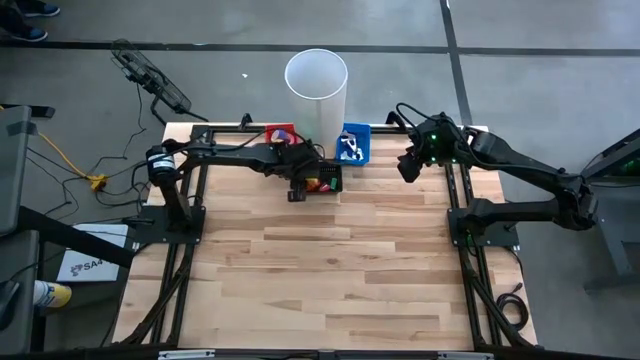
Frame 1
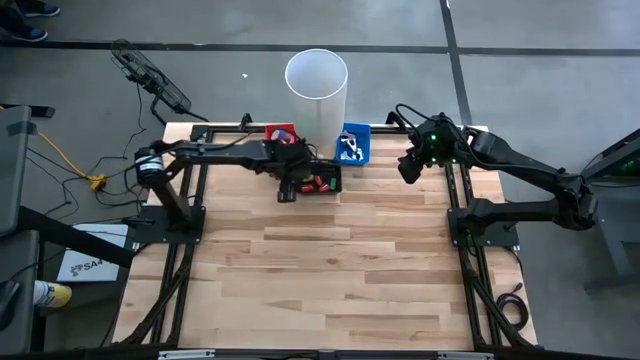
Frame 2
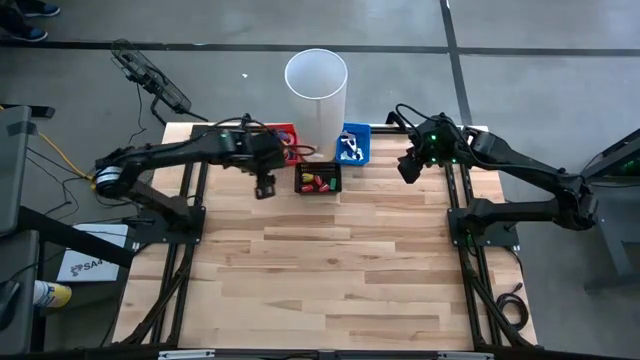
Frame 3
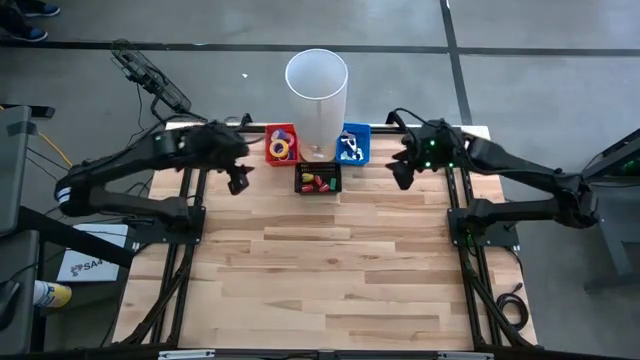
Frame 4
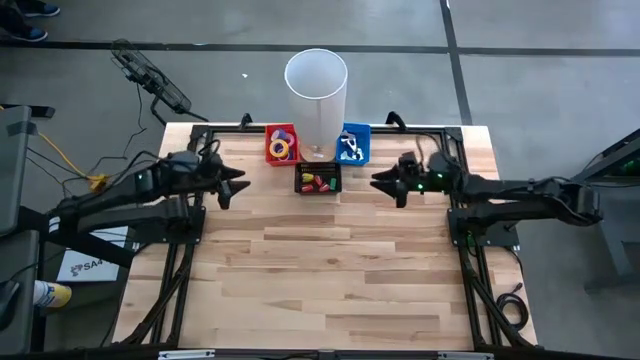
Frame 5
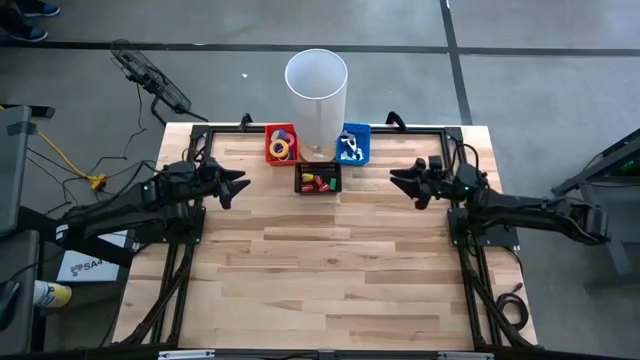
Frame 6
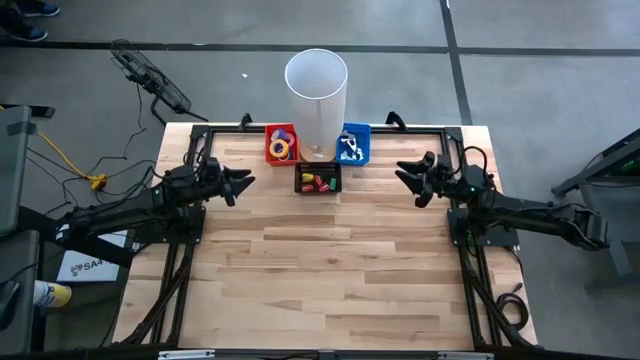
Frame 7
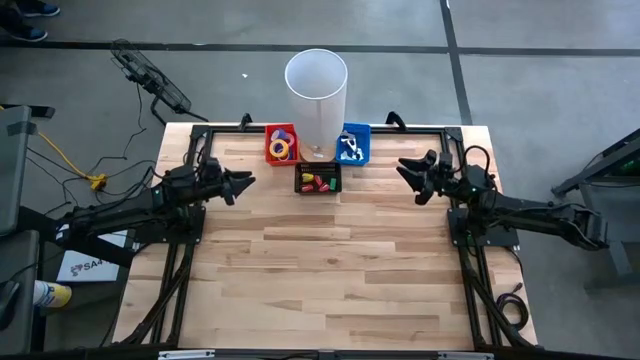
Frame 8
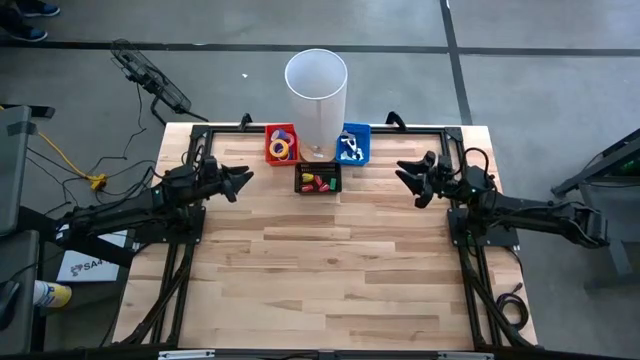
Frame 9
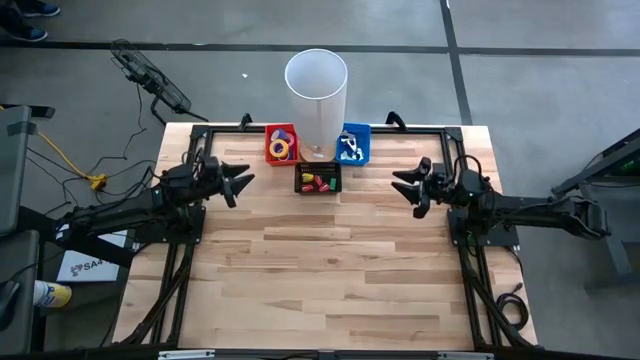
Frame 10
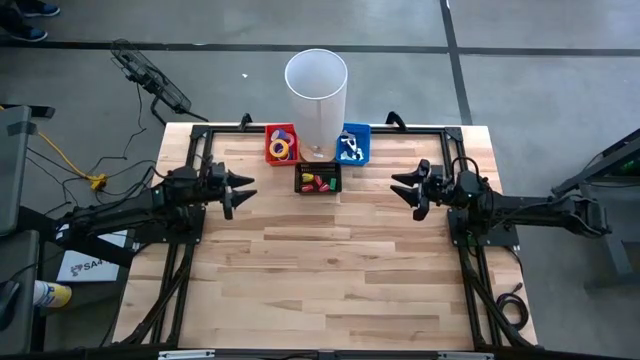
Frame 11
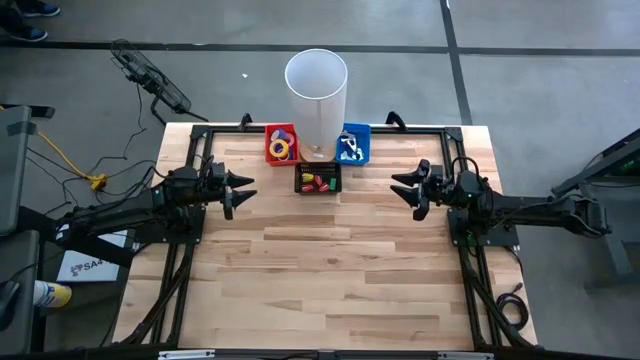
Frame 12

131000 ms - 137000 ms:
Task: Pick and place Stapler, Stapler remover, tape
Return to Home Position

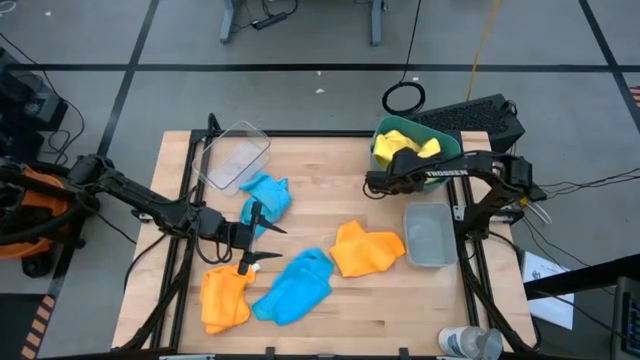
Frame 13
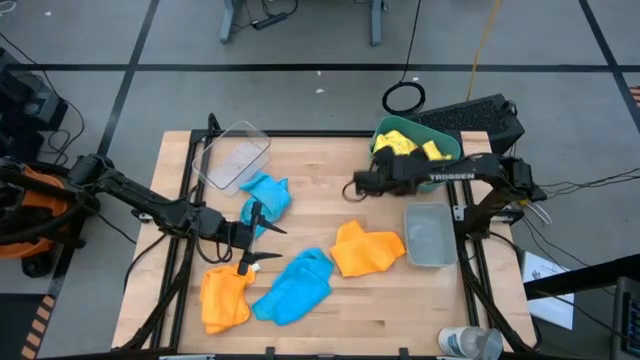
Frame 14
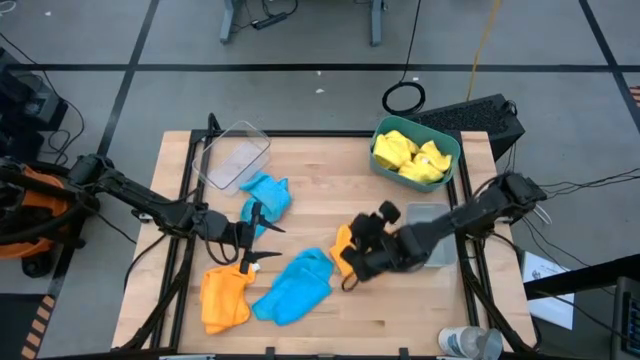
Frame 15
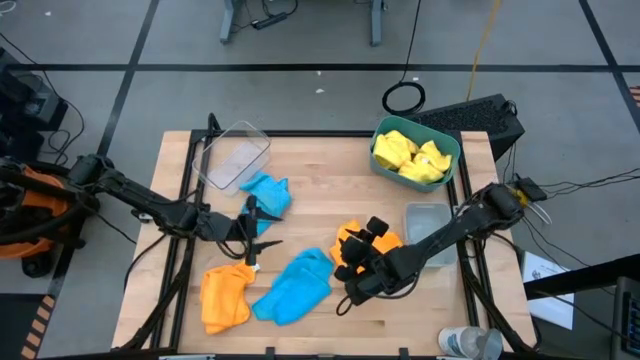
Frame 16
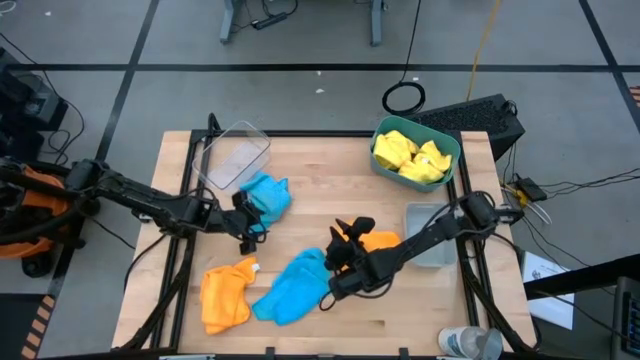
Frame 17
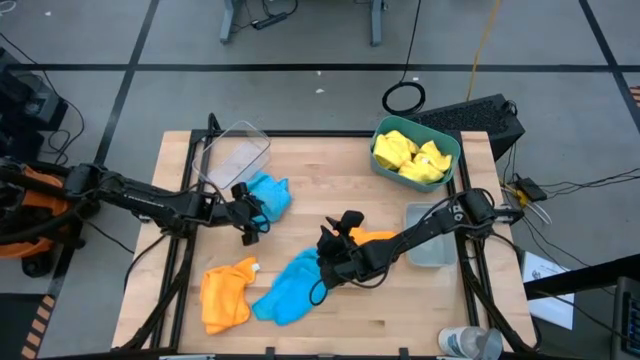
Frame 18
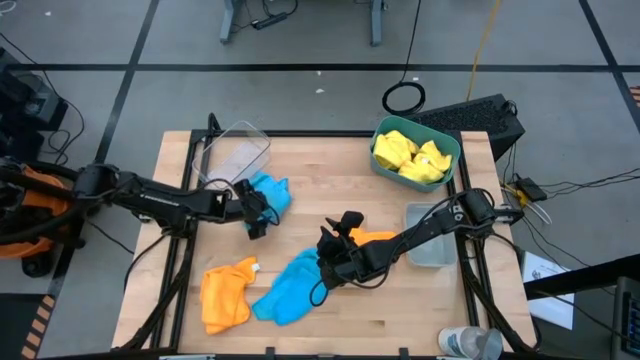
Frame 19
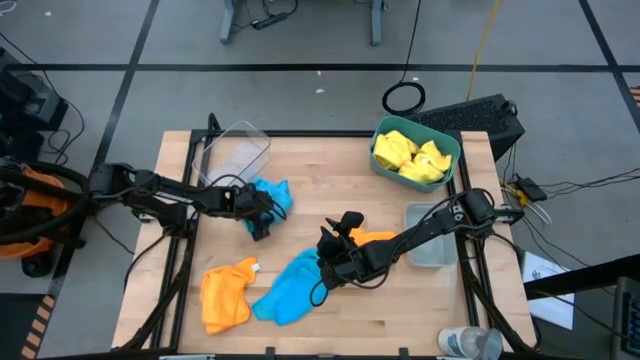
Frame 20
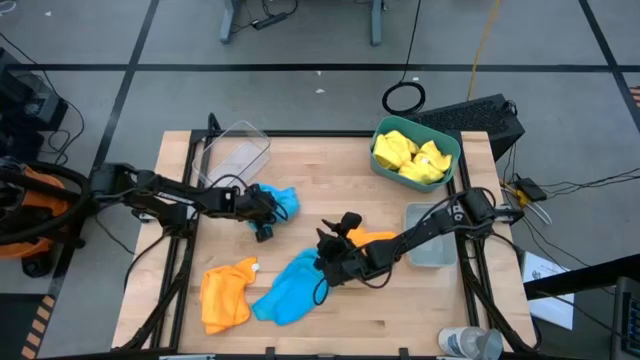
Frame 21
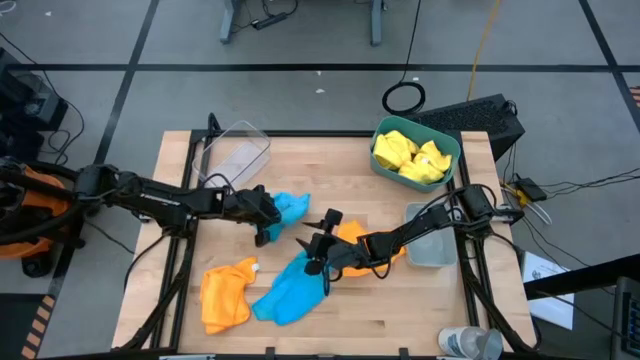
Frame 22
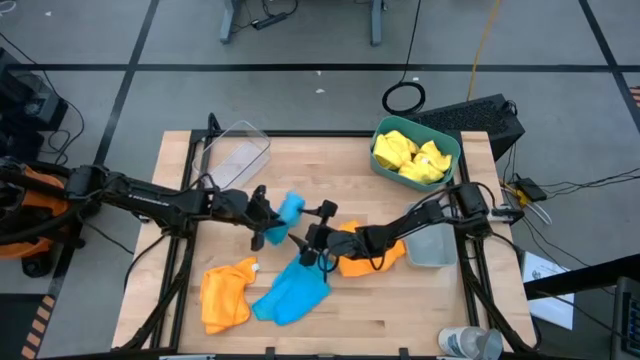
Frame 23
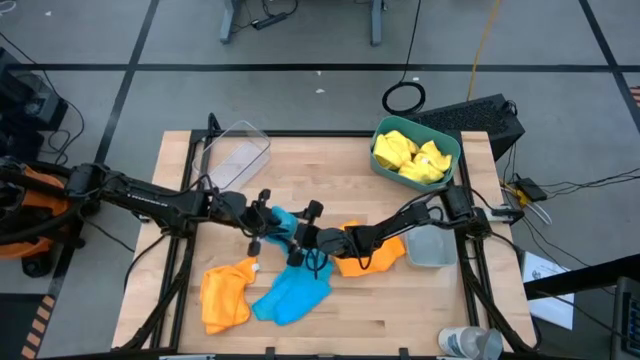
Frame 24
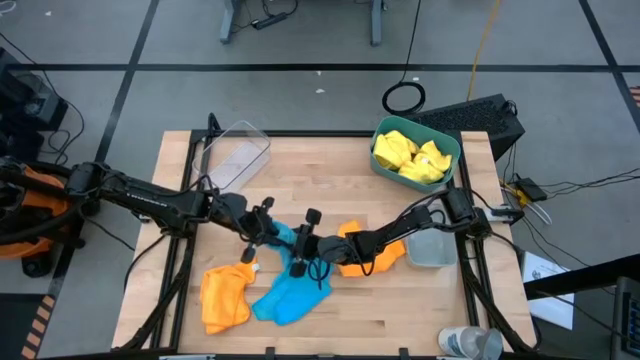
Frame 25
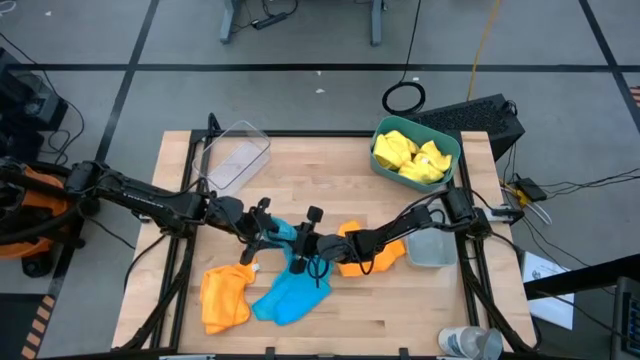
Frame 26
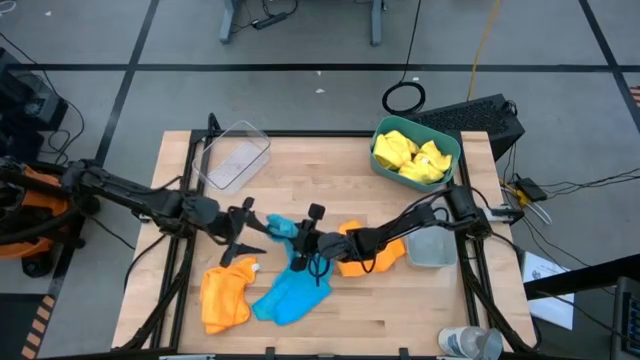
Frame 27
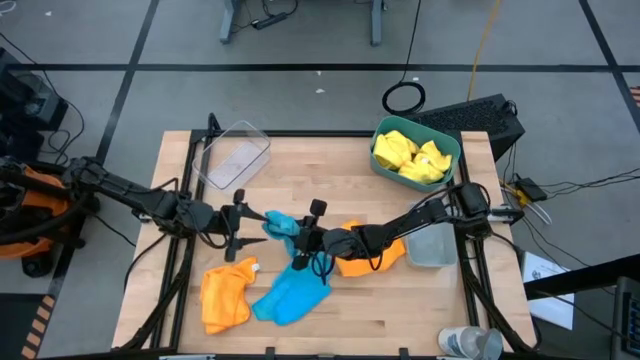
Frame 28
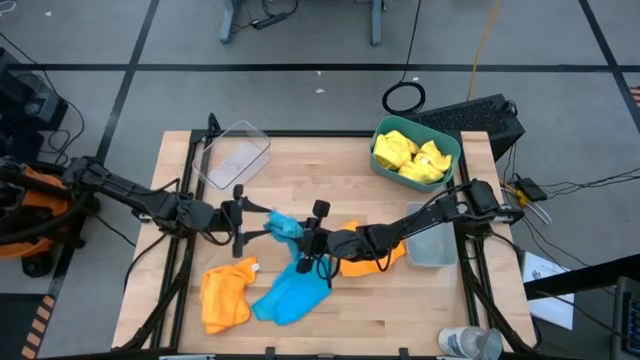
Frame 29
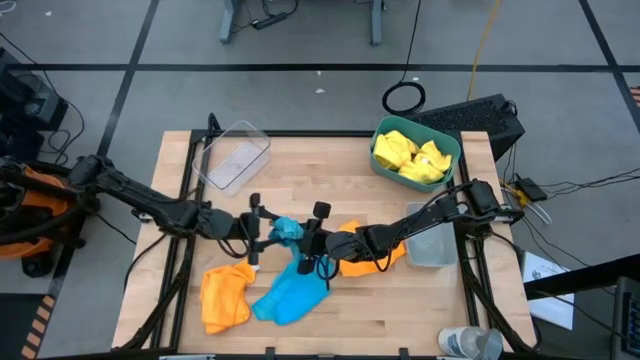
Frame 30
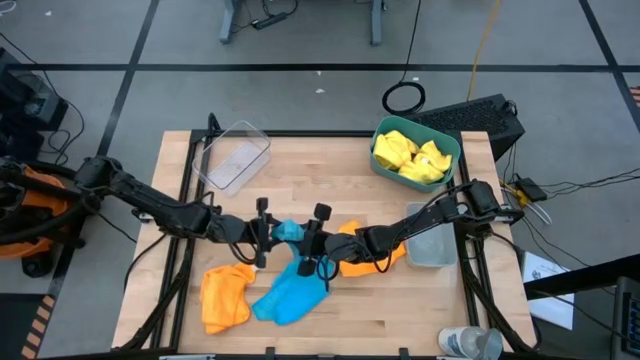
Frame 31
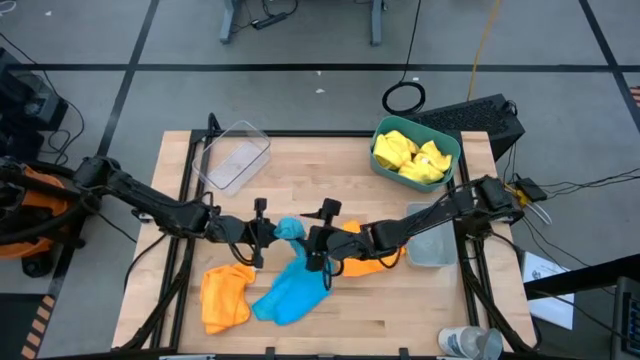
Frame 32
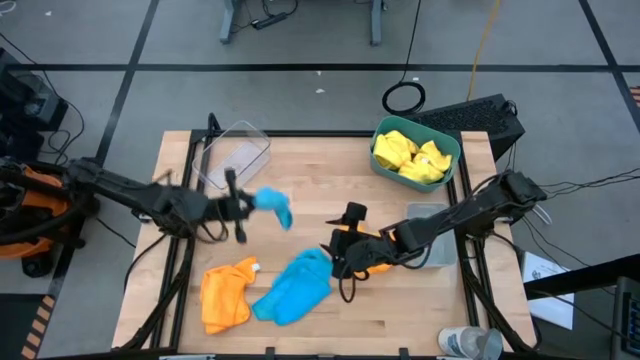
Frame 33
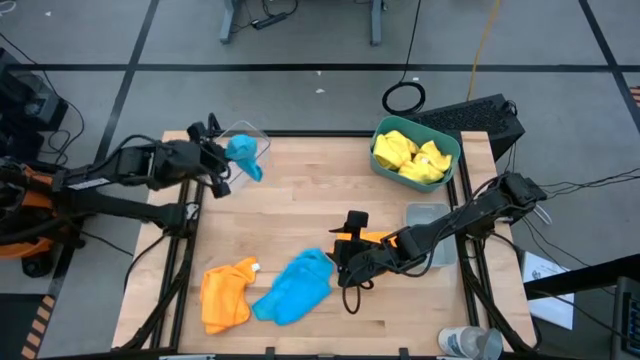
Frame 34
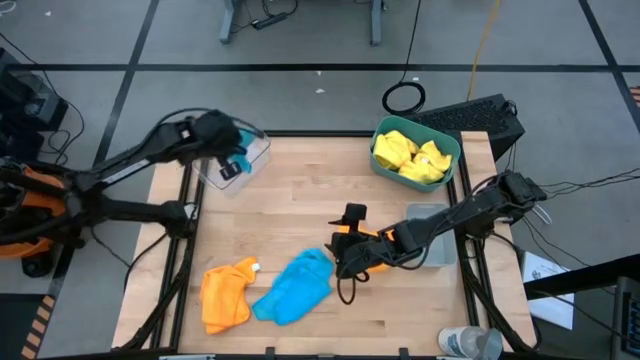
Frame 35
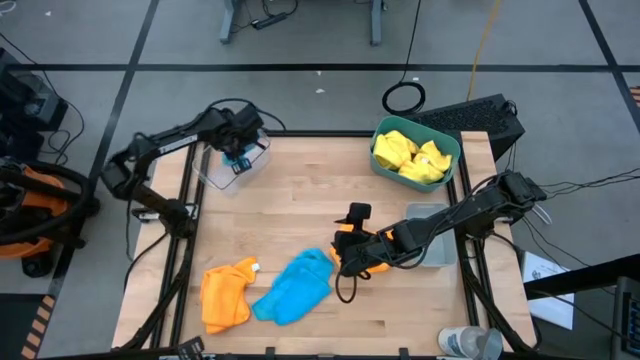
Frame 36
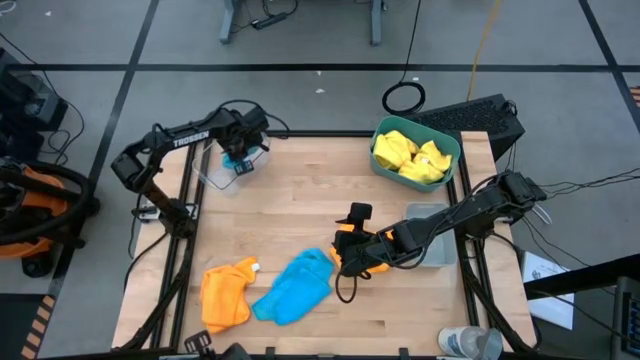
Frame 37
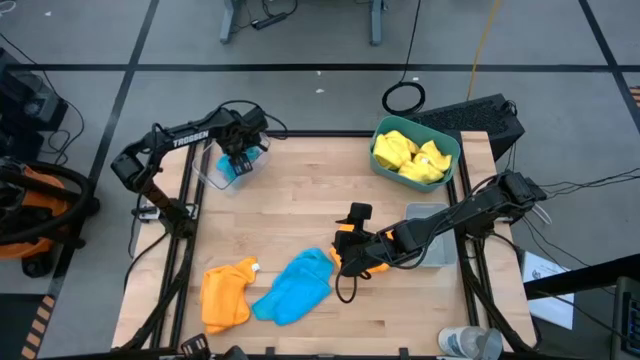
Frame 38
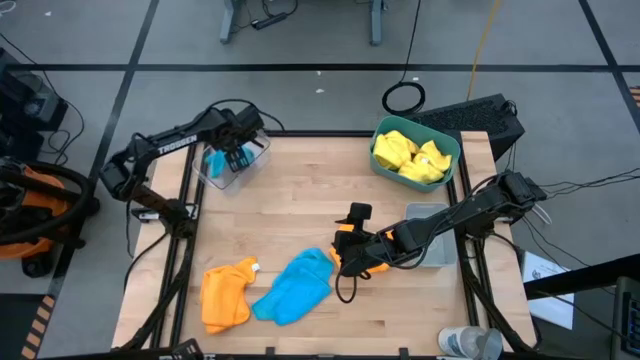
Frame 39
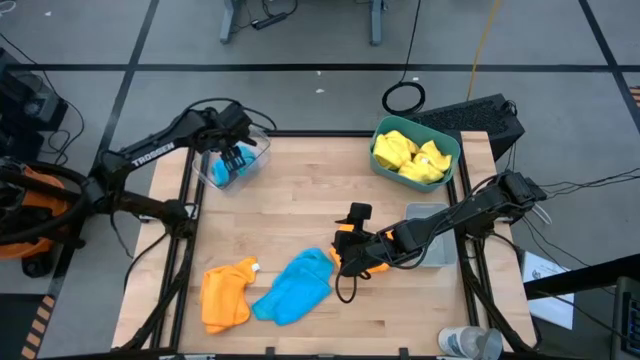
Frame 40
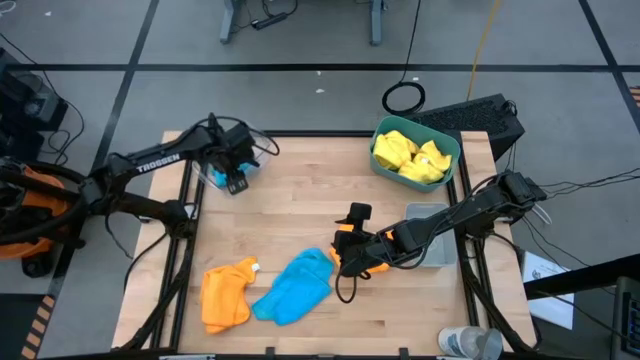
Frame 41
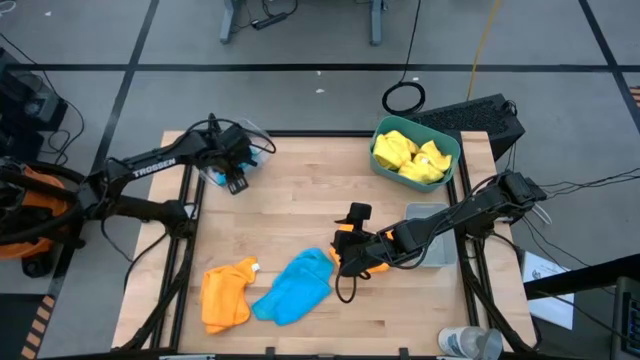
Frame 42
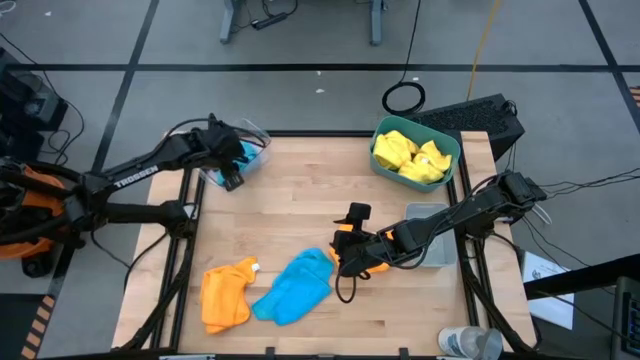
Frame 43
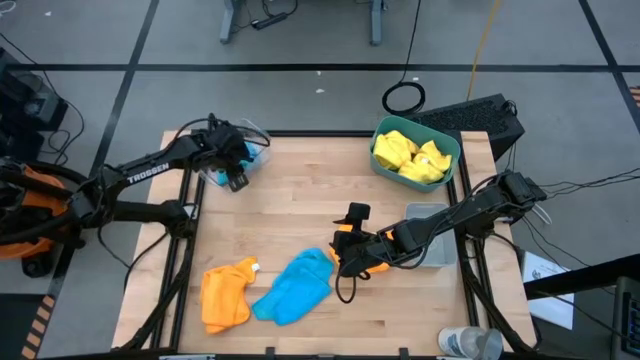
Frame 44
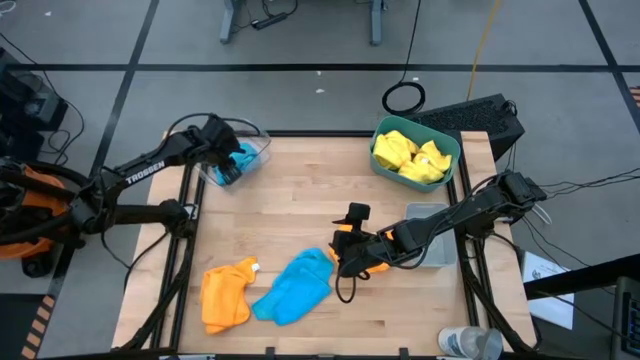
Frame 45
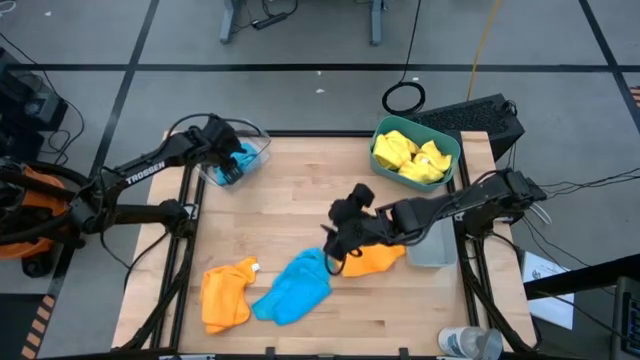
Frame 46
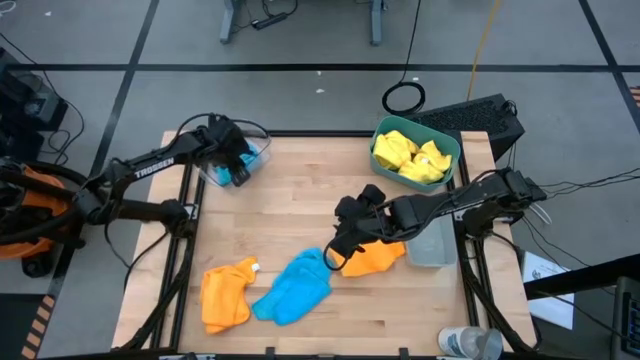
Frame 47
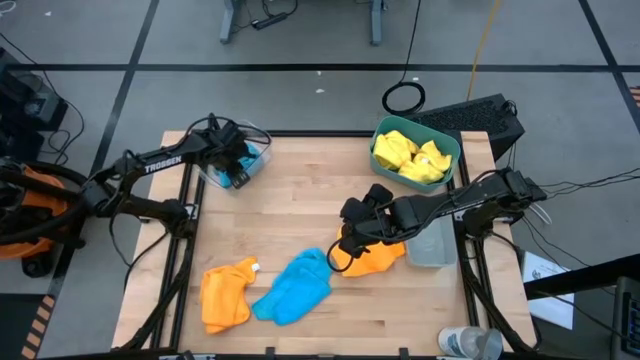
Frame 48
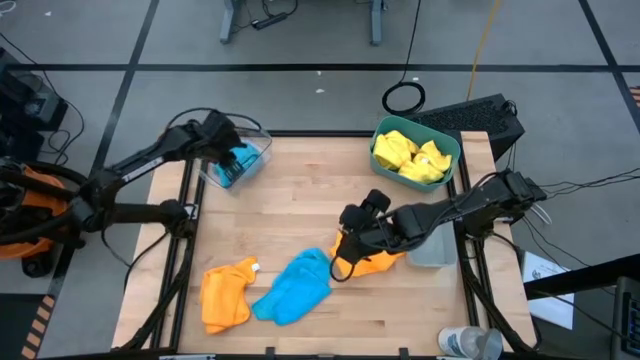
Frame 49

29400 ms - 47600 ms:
Task: Sort microfiber towel by color & place in baskets
Put the top blue towel into the transparent bin
